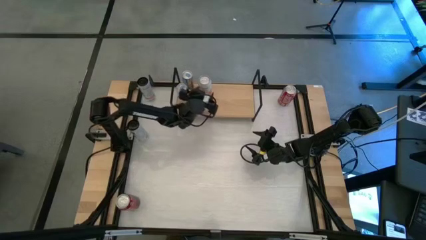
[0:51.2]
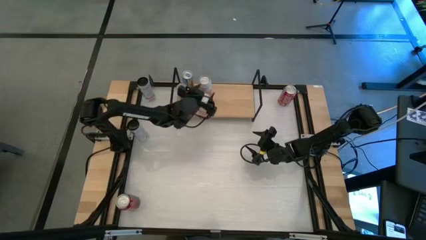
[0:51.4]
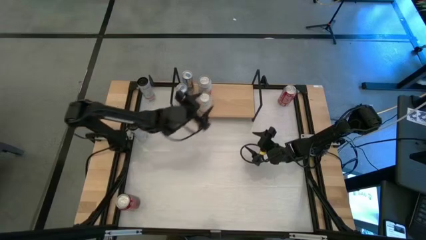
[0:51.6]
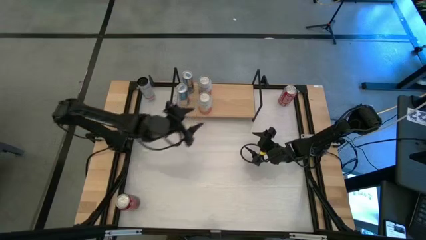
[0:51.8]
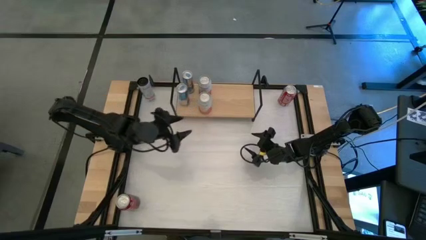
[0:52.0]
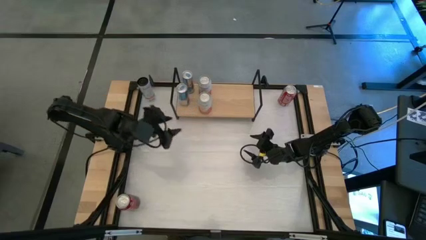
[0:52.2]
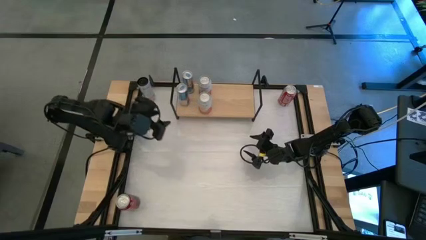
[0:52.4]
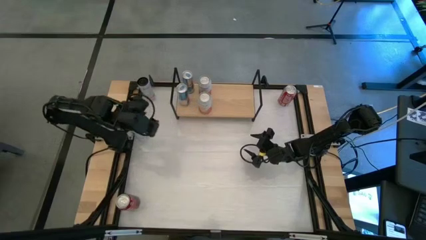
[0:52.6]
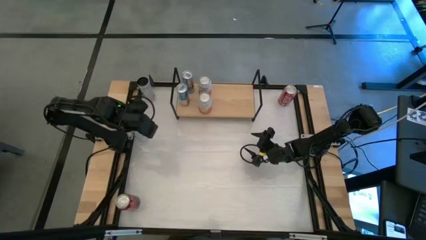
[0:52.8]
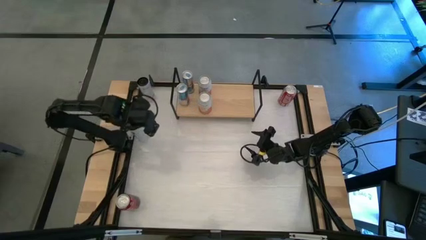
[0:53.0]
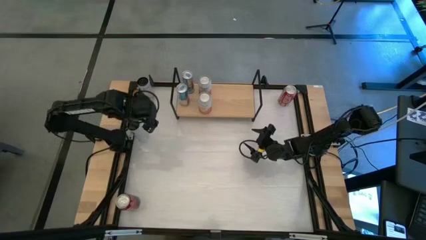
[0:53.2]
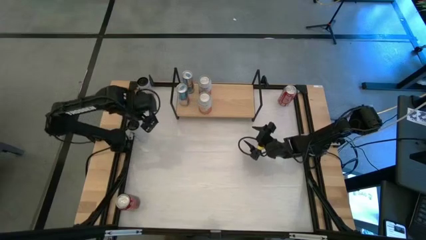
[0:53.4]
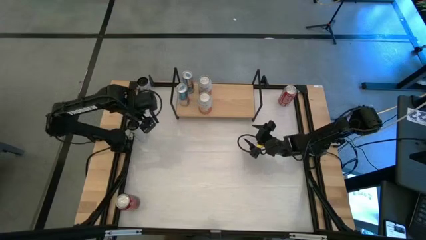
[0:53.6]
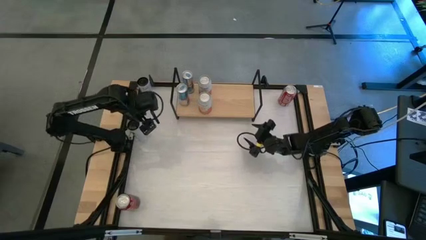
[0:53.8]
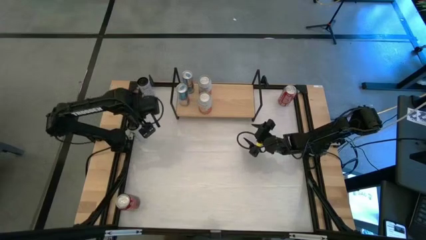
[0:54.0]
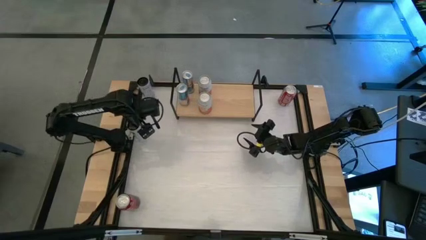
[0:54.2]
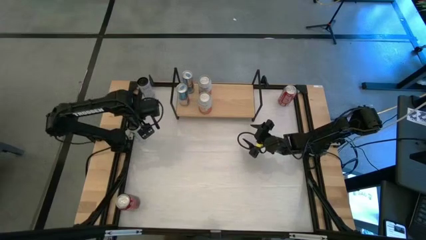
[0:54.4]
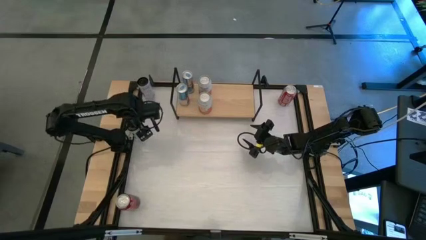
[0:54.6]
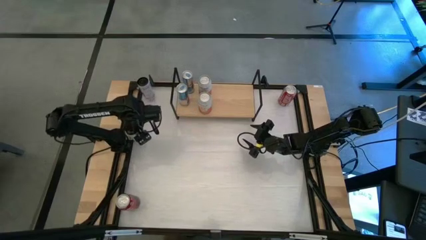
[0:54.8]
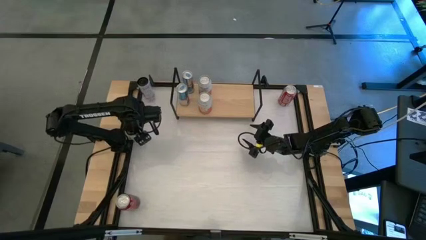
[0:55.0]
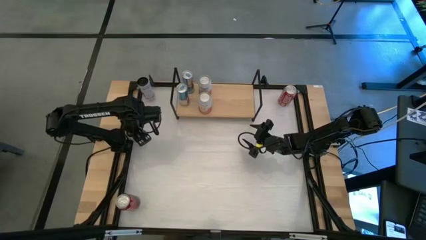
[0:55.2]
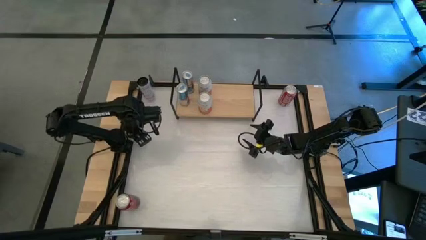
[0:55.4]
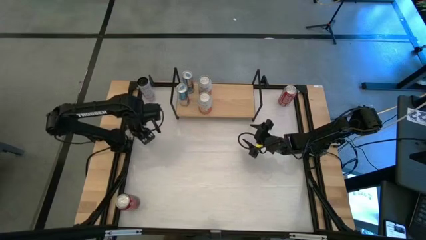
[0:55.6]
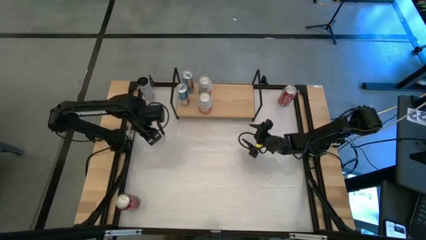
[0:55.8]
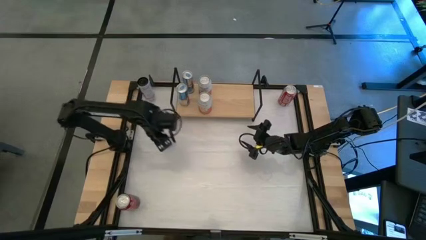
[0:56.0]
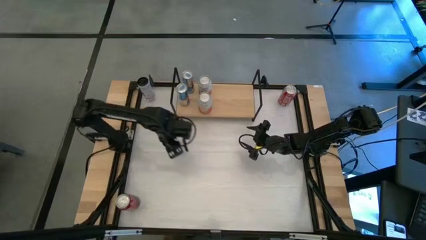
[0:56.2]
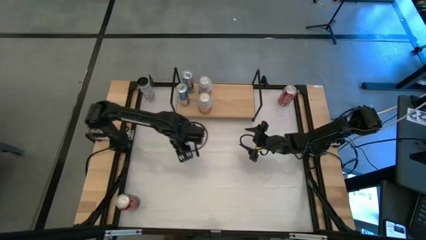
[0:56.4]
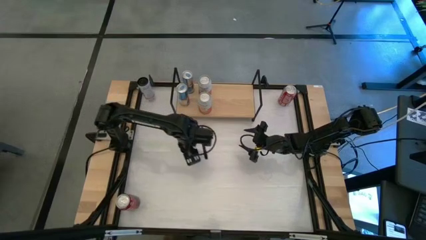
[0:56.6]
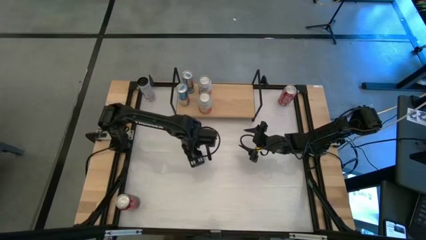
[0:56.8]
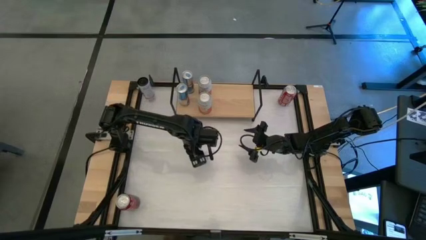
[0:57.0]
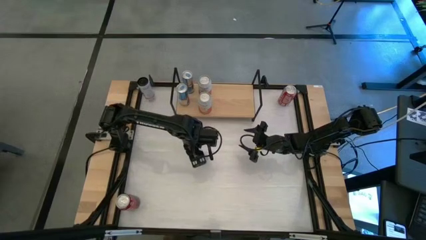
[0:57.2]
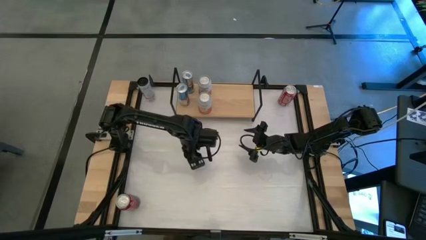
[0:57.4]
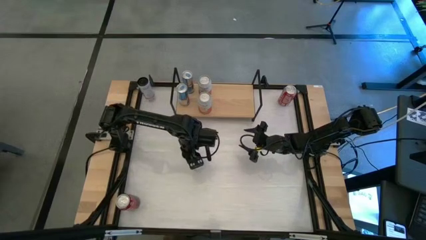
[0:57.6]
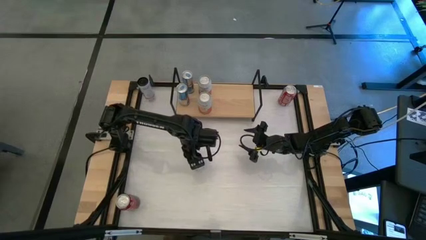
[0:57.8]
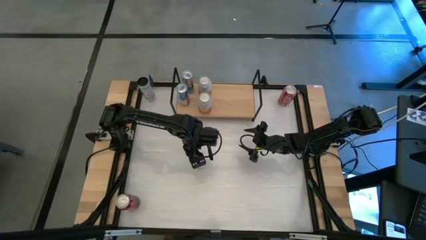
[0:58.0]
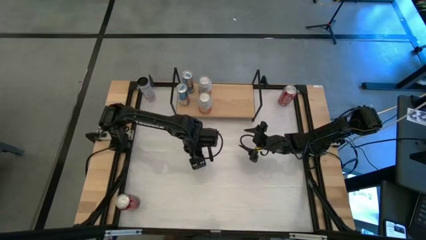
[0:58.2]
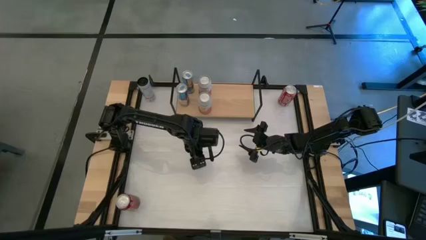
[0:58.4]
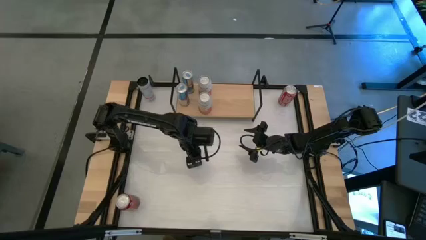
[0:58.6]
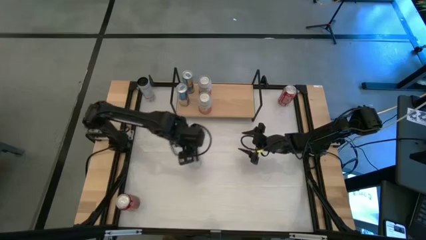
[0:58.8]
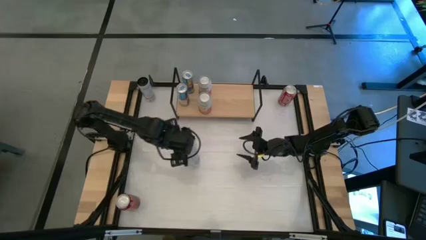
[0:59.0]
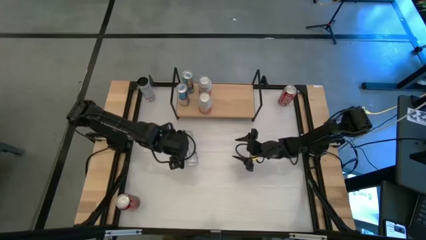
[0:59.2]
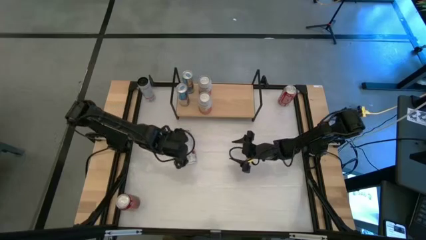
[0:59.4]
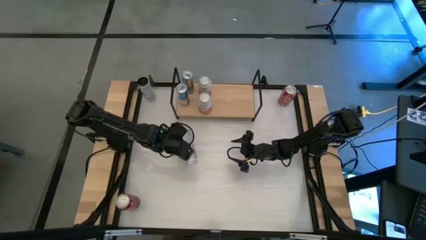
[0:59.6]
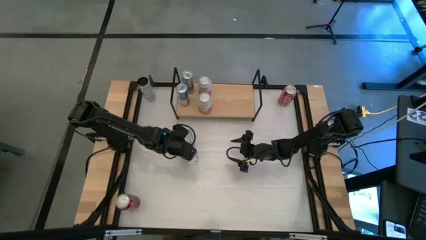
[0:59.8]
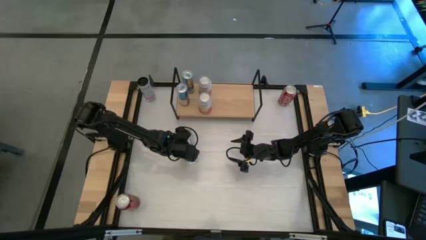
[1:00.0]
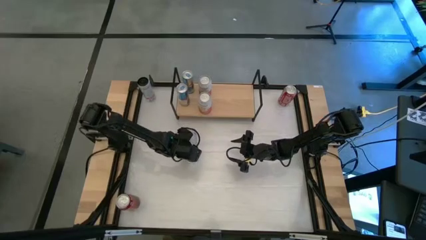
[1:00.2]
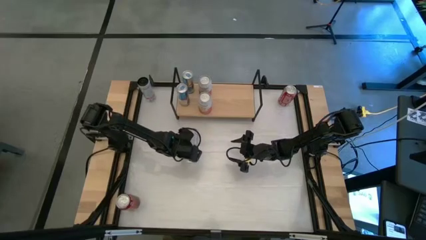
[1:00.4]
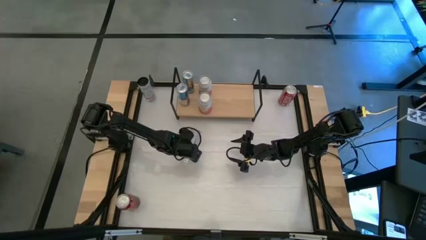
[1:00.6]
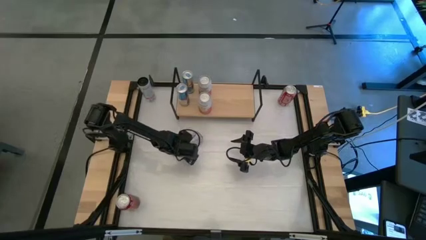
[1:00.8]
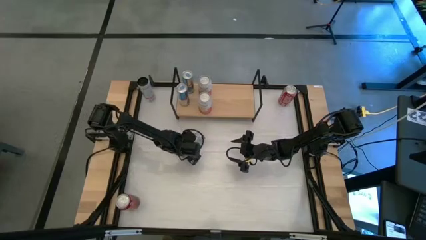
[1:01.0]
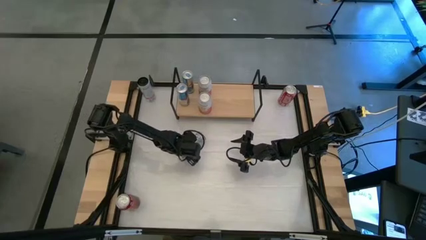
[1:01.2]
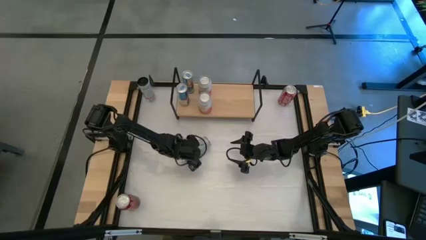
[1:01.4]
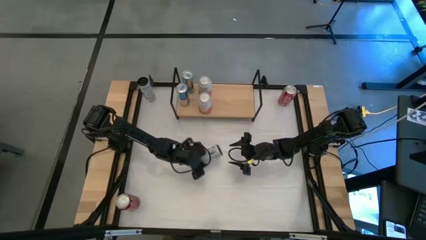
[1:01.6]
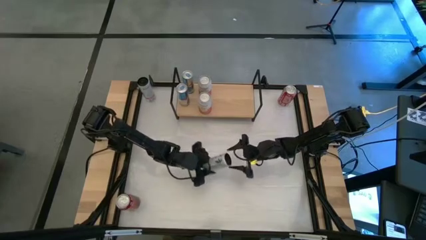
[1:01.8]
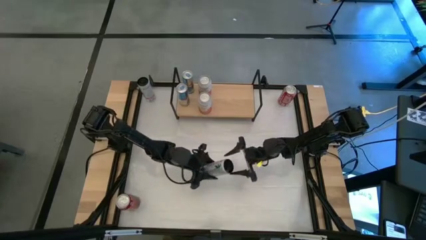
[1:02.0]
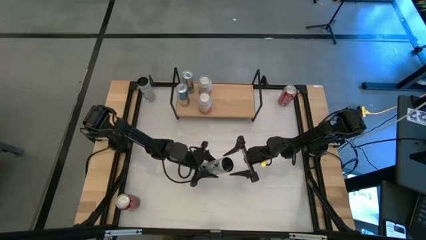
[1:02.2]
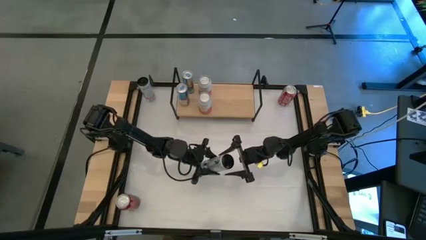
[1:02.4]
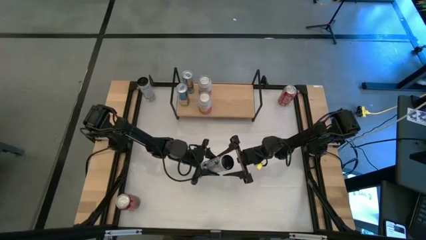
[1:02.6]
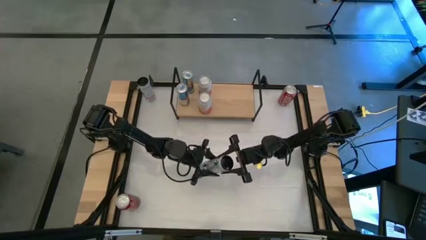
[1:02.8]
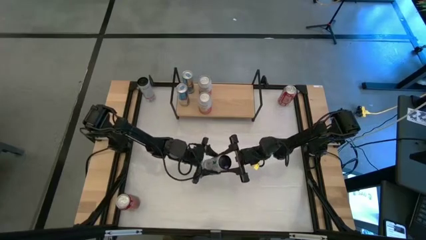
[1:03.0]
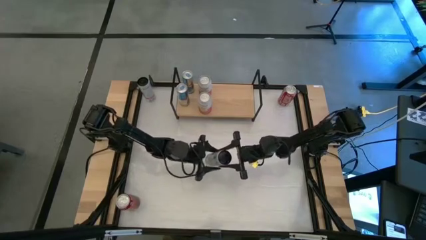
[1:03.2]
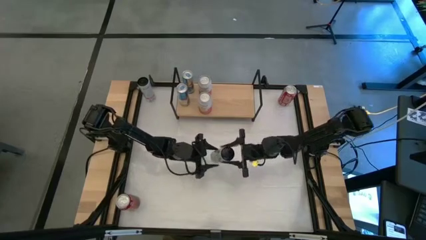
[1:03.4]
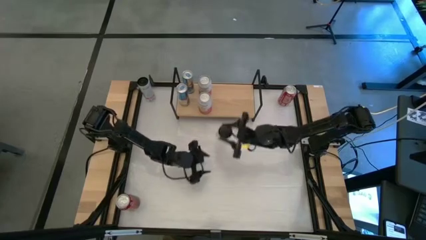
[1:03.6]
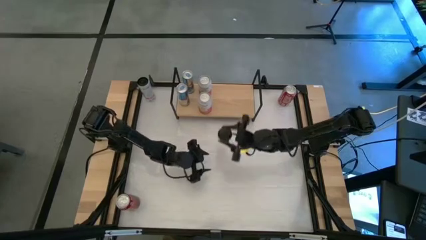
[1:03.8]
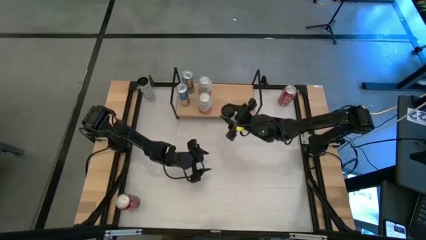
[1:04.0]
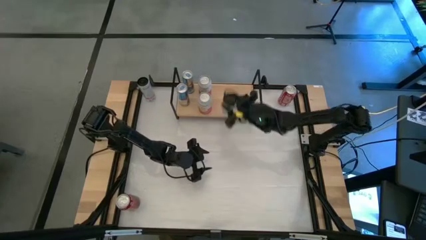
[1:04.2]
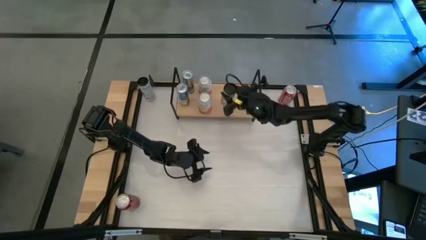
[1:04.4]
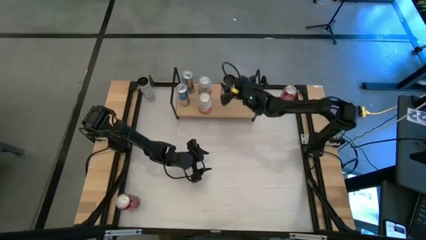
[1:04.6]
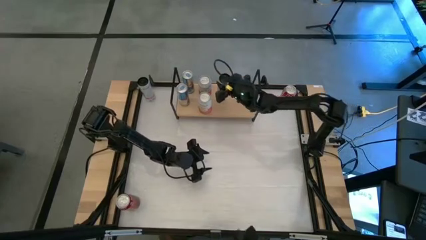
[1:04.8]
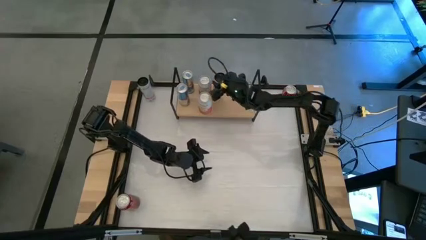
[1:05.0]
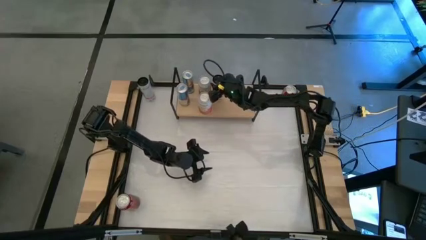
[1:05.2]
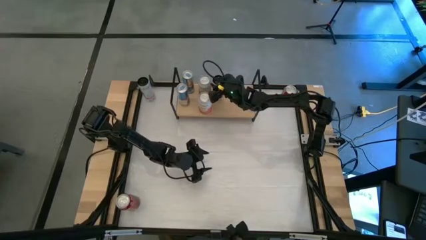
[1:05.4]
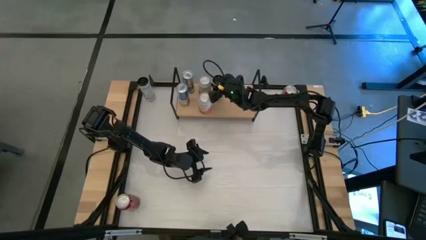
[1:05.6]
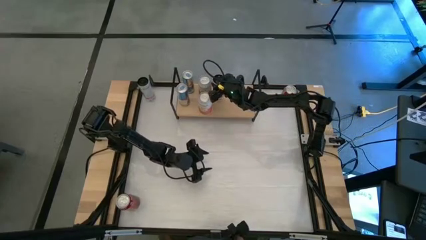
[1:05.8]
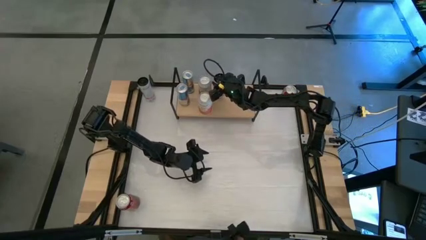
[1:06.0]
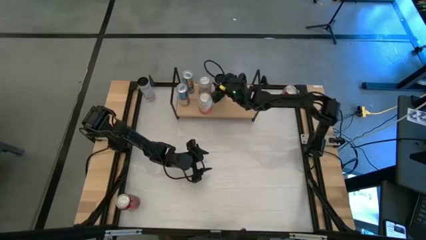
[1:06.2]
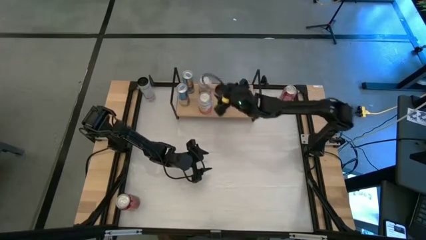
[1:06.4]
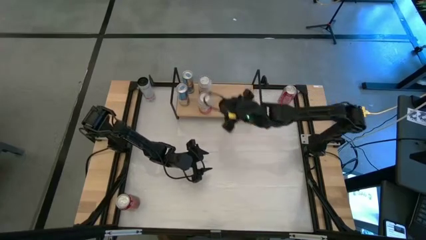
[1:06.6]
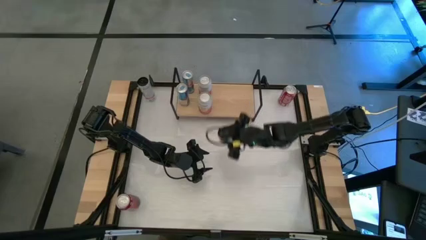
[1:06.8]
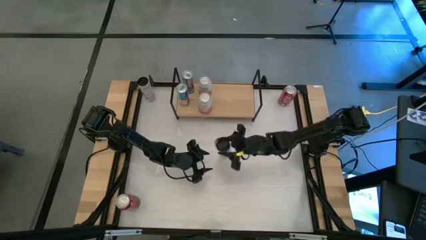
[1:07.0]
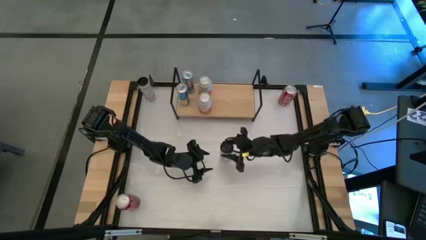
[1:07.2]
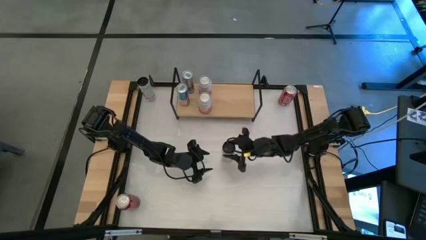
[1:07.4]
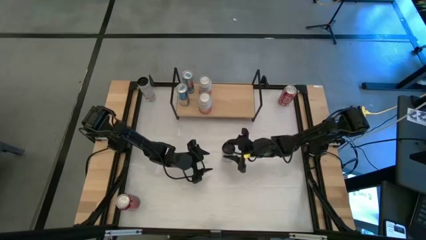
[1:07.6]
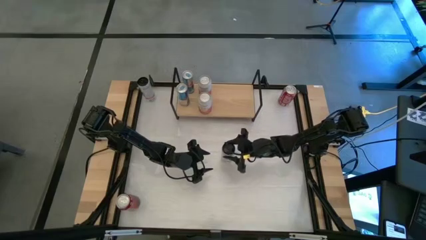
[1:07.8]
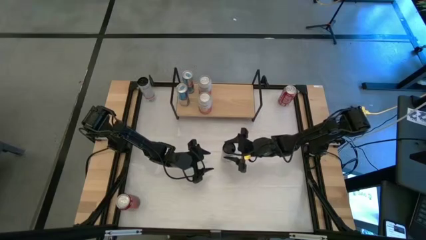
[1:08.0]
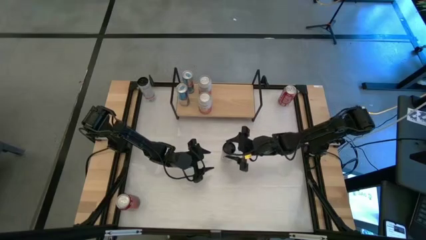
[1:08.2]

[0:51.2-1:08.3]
Task: Place canned beverage on shelf
Put the bottom white and pink soda can on the shelf
